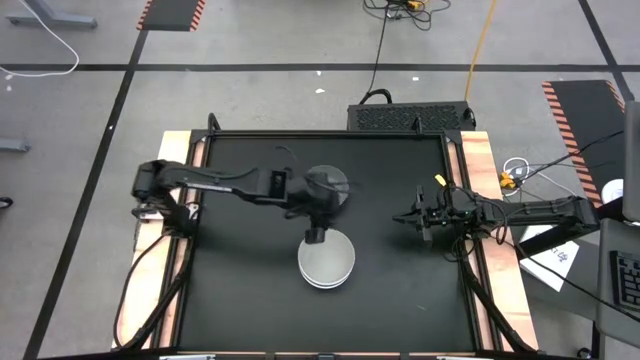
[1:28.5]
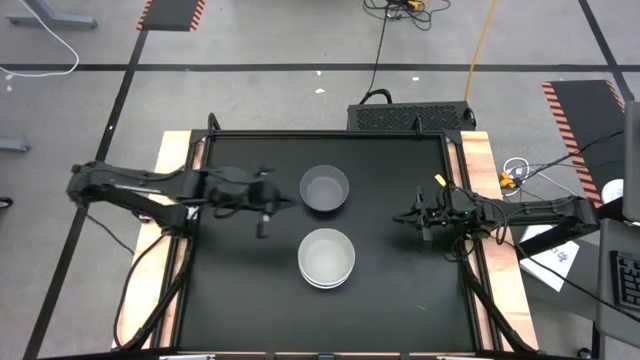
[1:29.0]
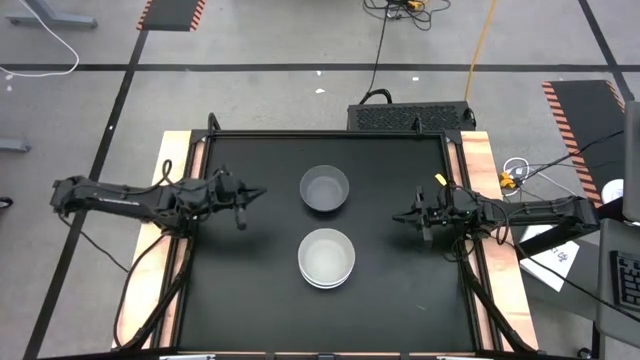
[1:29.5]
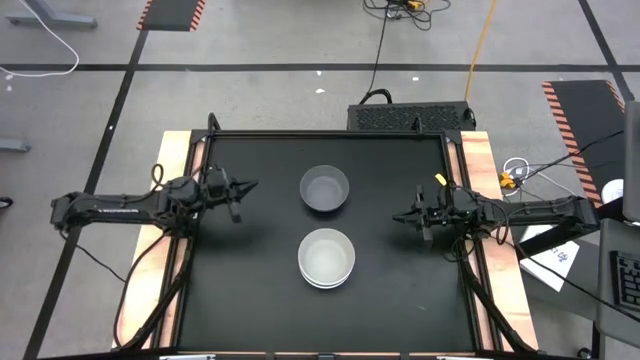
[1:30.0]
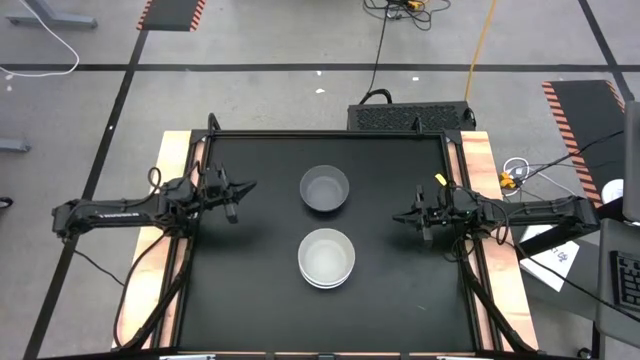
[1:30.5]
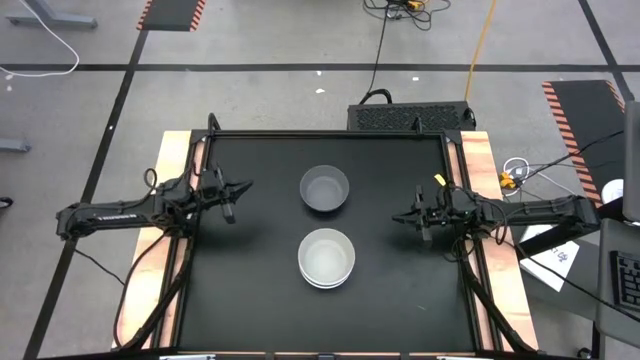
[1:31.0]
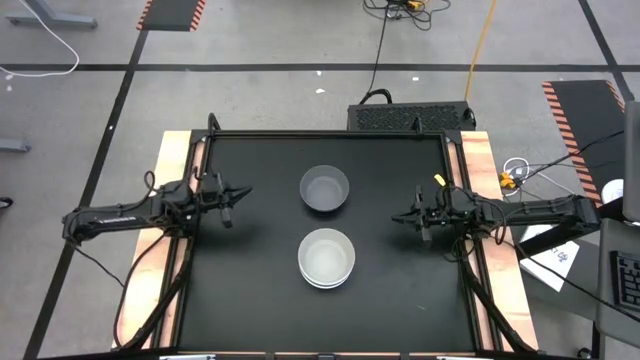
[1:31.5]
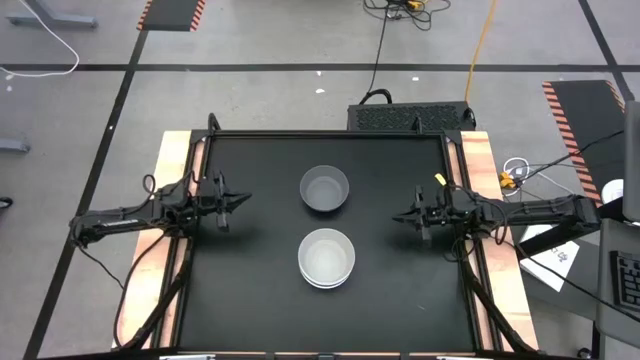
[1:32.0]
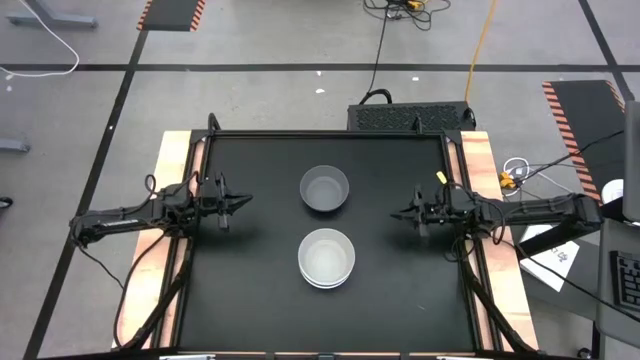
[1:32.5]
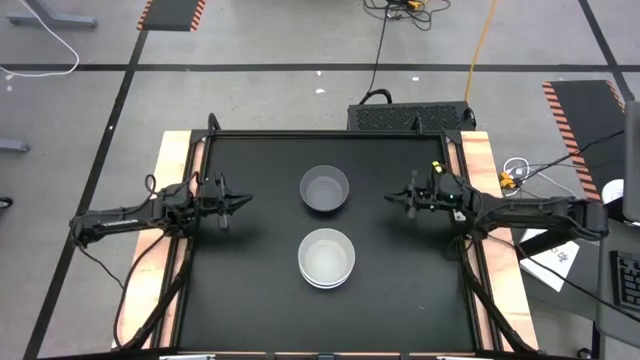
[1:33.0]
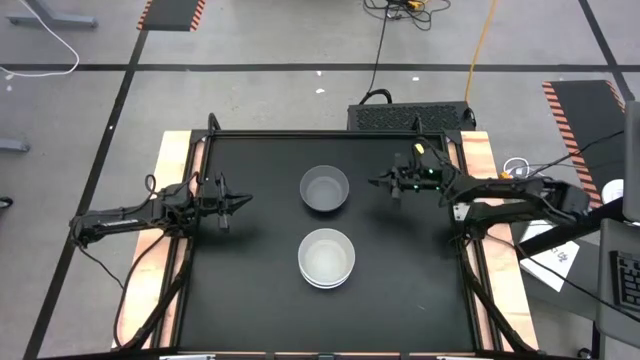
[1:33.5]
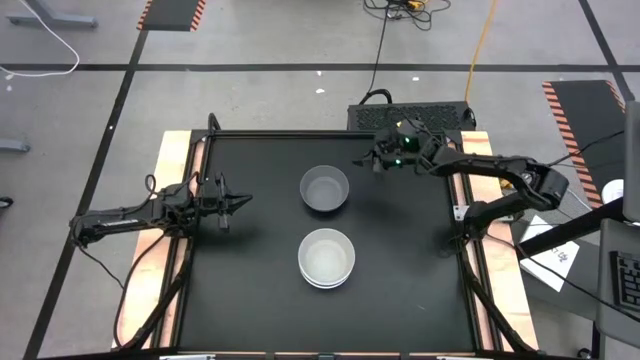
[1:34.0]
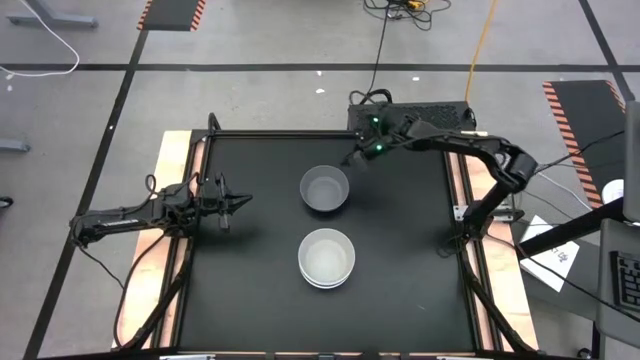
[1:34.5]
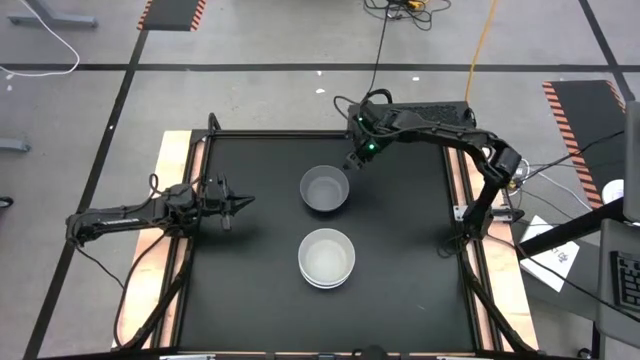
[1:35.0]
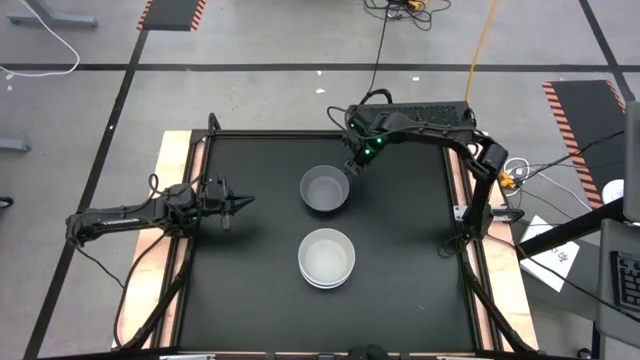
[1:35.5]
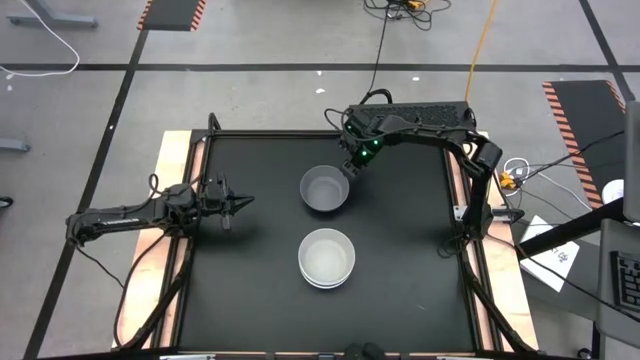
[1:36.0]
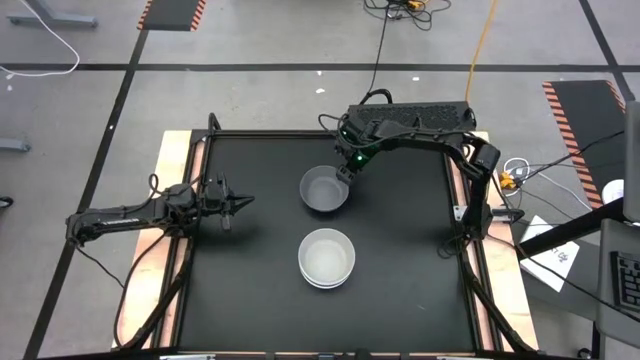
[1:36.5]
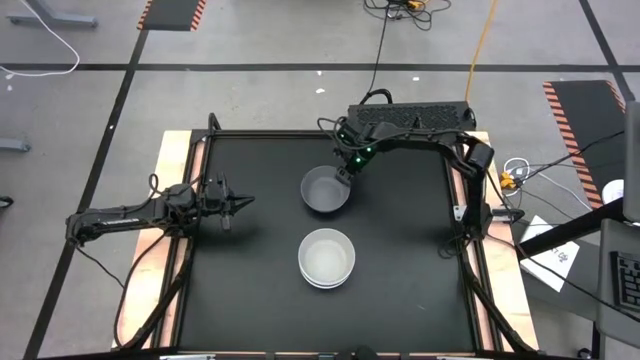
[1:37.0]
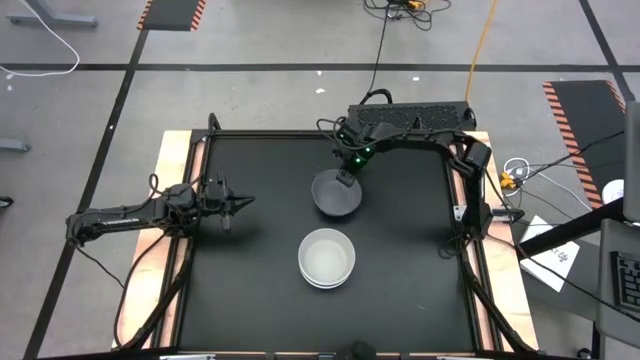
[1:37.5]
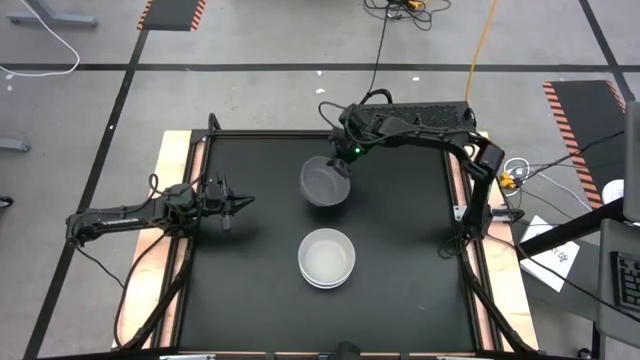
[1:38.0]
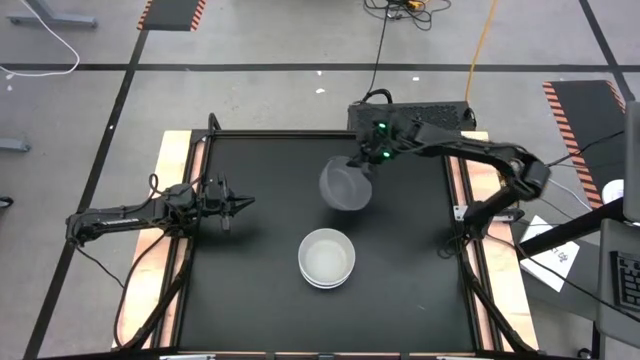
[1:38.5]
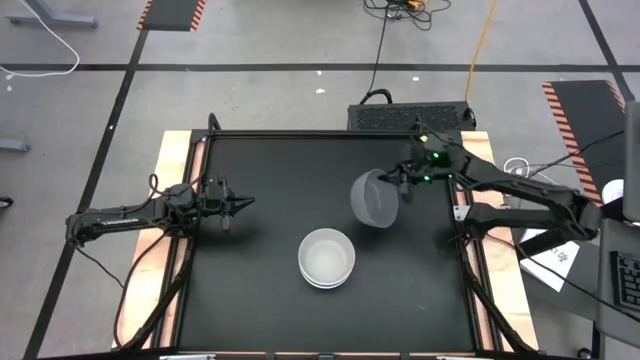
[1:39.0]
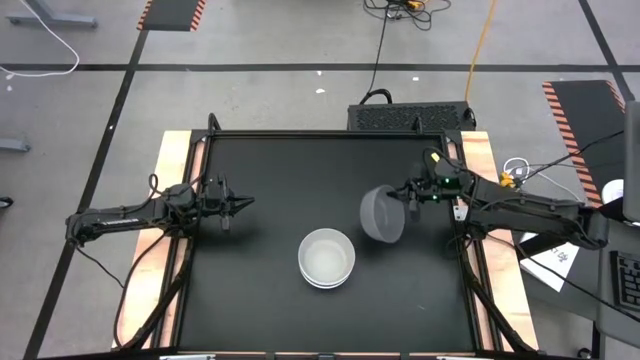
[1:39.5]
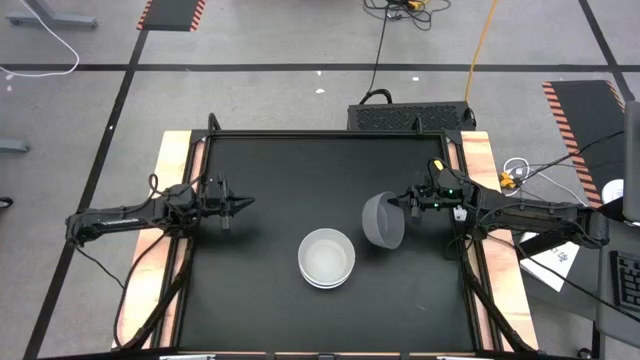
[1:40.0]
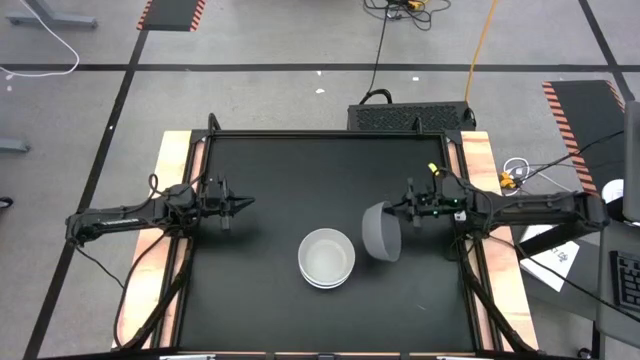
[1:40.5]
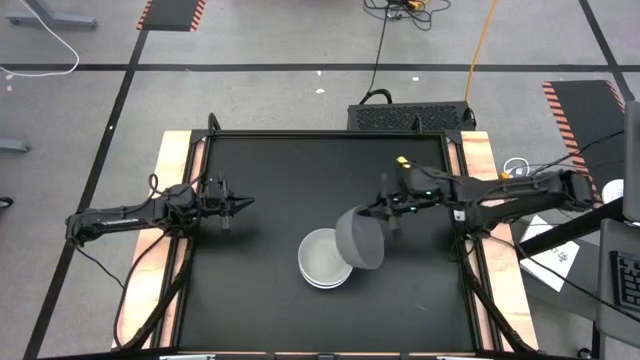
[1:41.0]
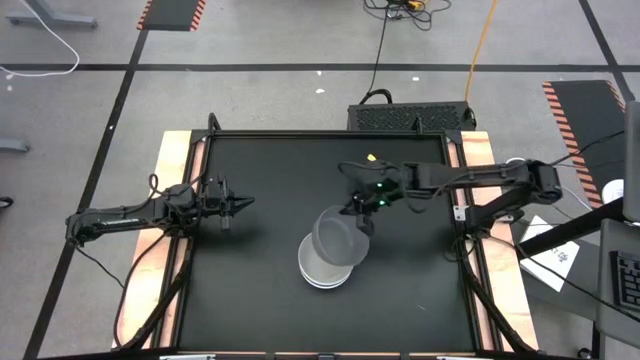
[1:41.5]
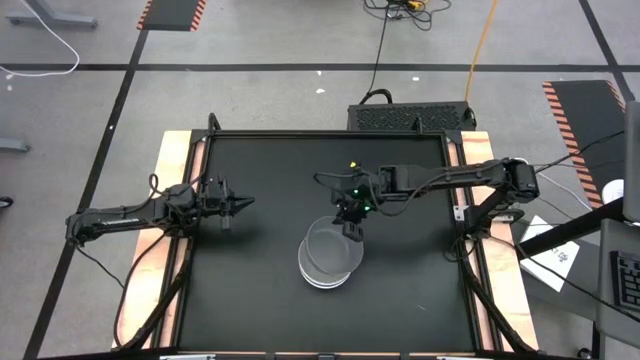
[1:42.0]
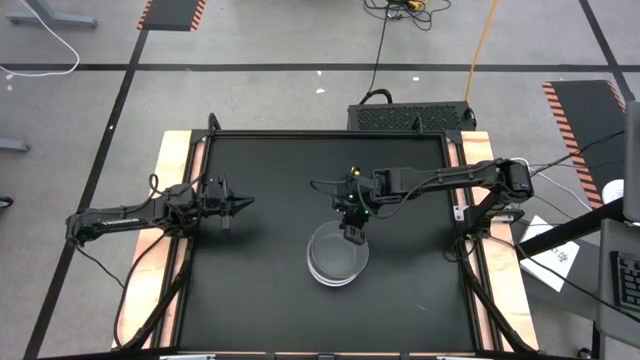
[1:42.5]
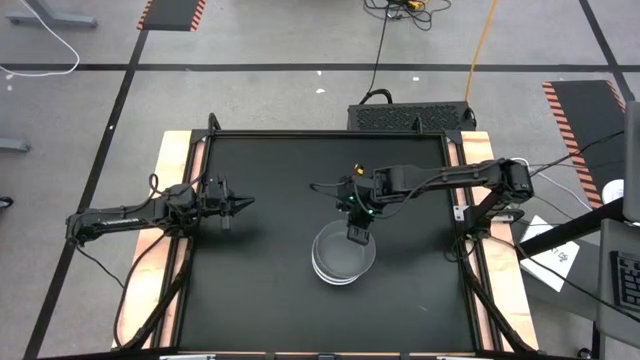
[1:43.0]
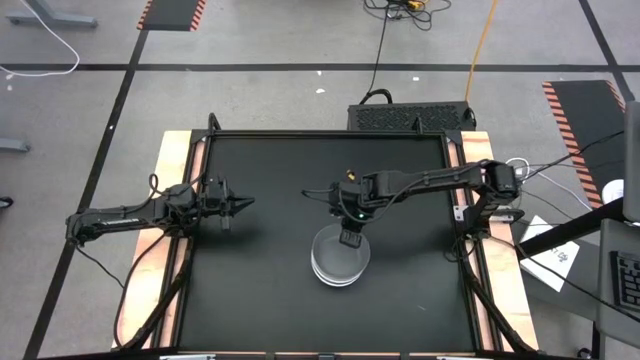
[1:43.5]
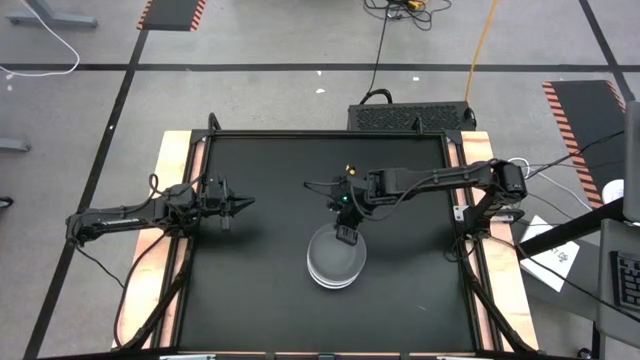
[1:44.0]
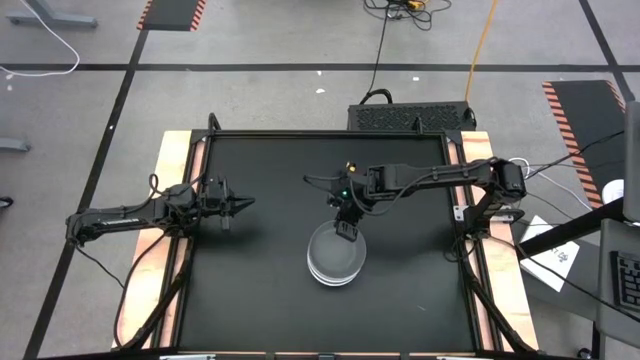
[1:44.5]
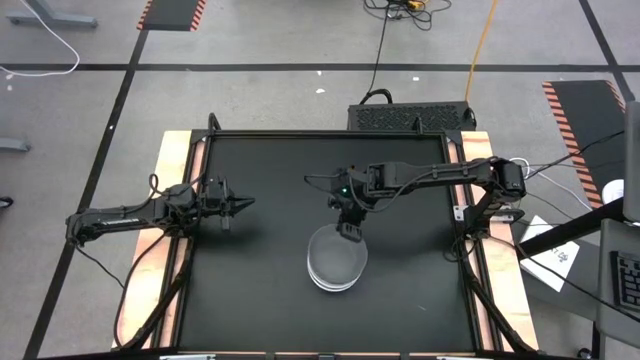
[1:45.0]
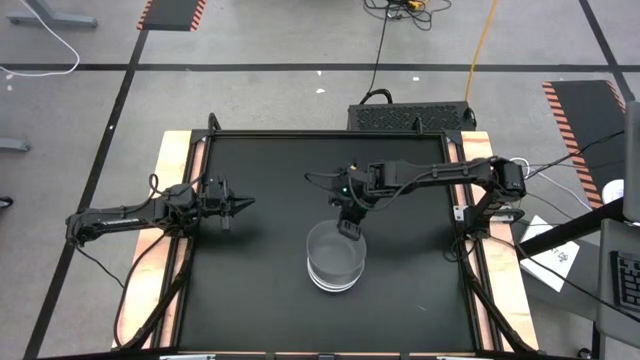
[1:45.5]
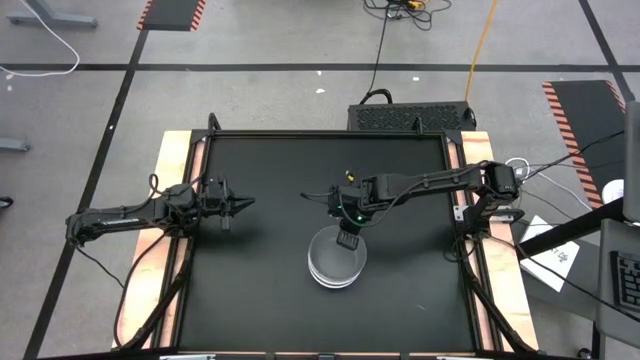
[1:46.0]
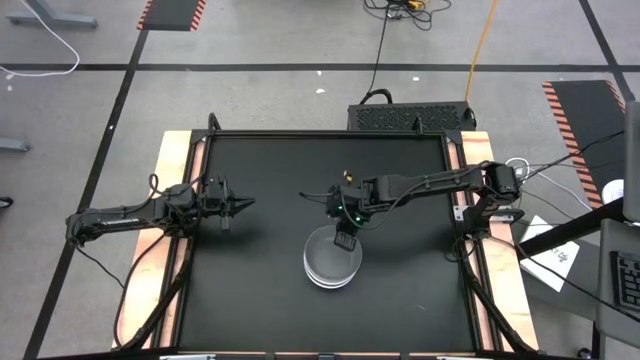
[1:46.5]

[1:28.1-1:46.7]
Task: Nest bowls inside each other
Stack the dark gray bowl on the gray bowl

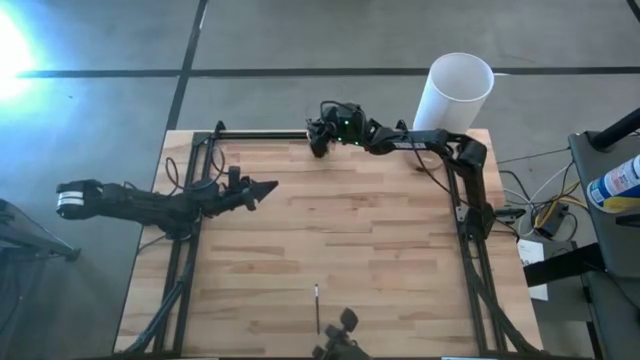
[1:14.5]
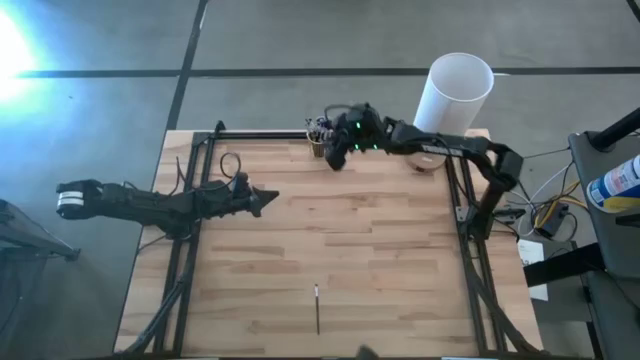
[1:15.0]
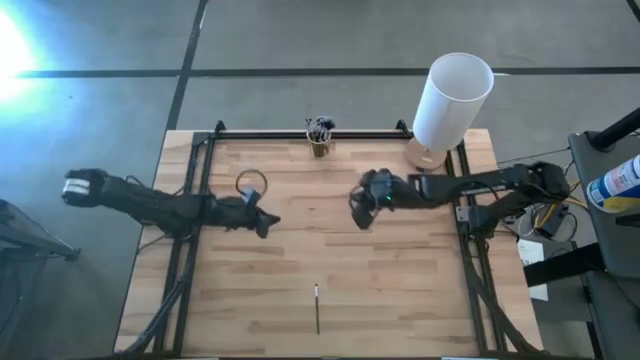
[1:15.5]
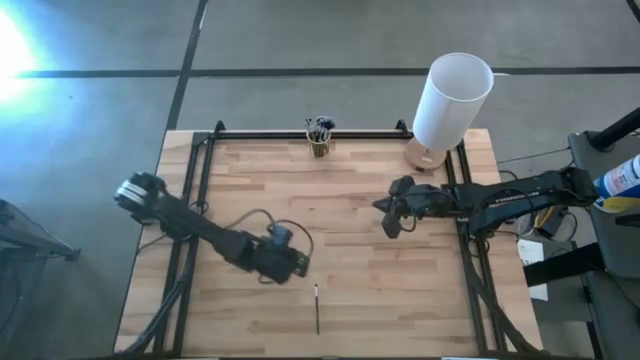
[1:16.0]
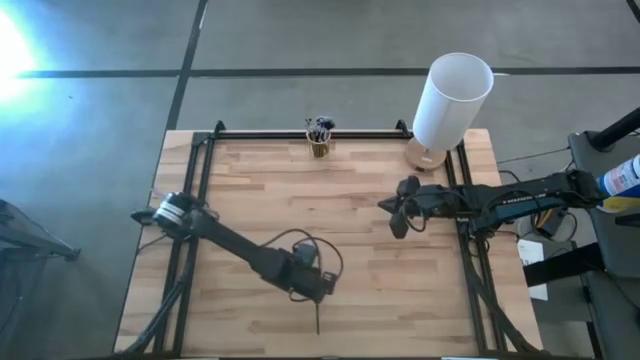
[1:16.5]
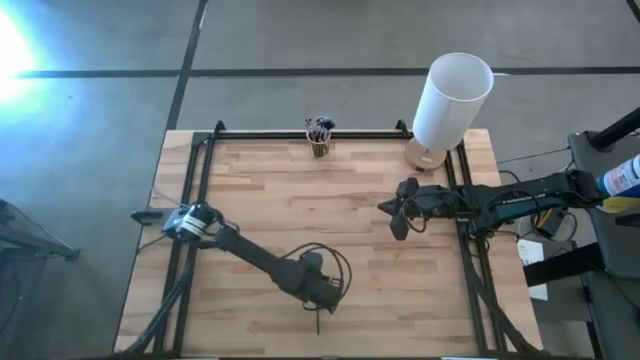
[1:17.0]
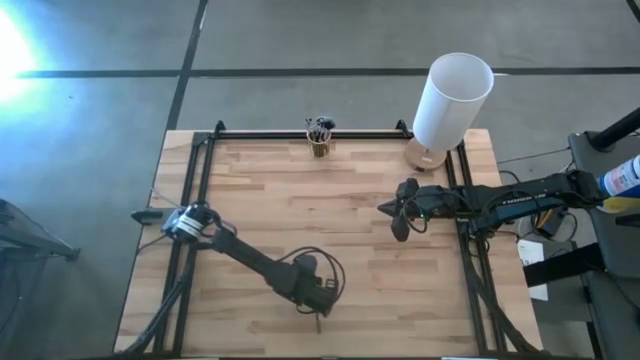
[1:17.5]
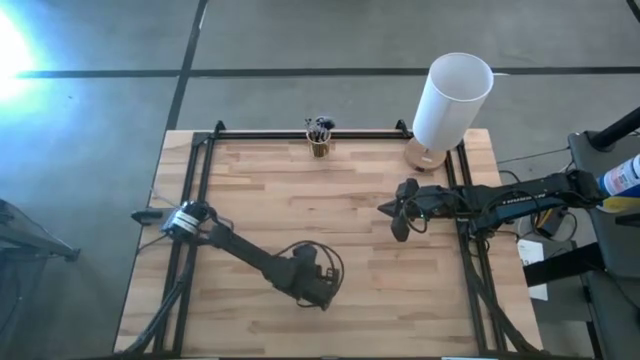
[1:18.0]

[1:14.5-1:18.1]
Task: Put items in baskets/containers
Put the black eyeshadow brush into the yellow pen holder
